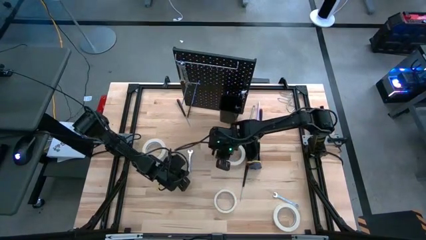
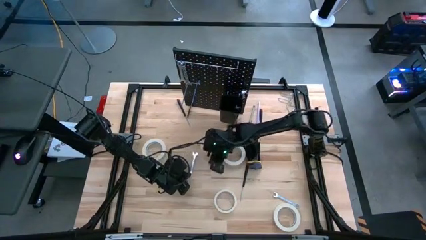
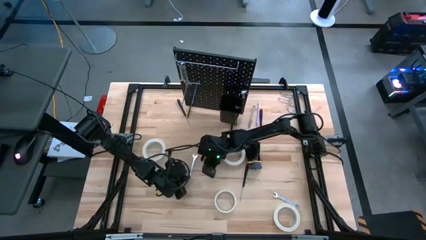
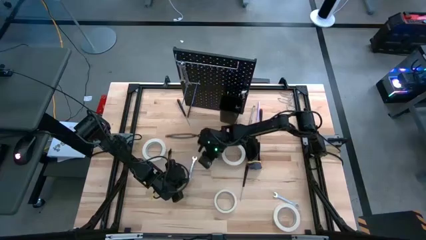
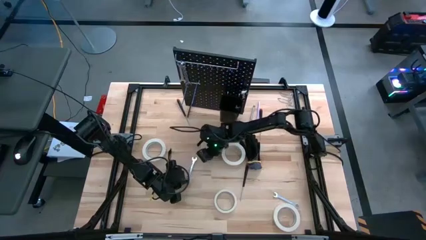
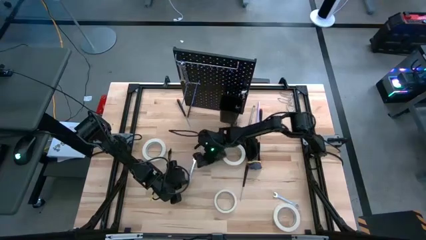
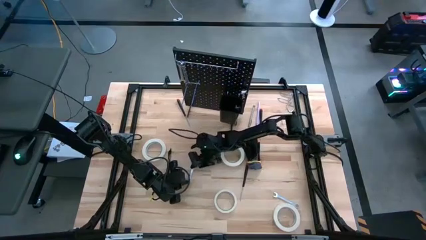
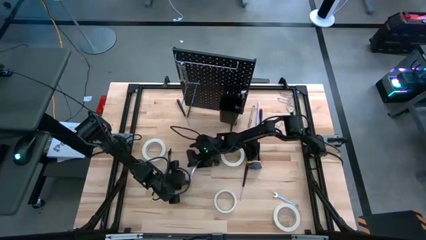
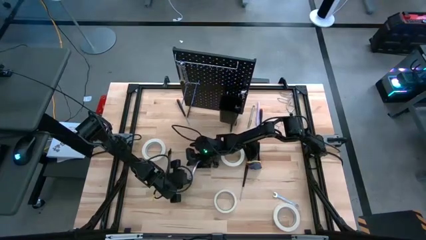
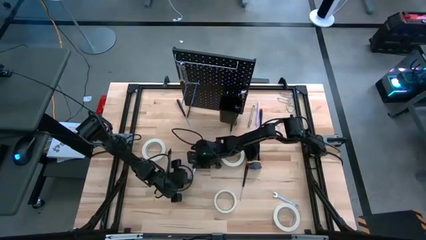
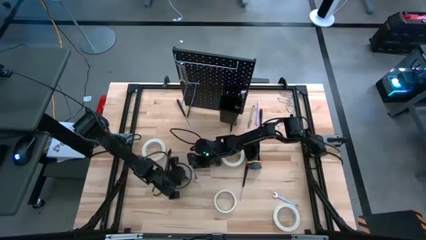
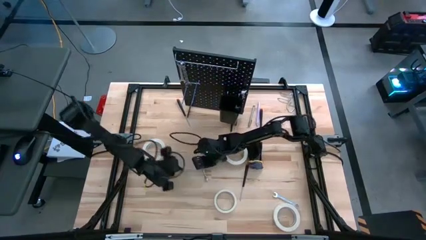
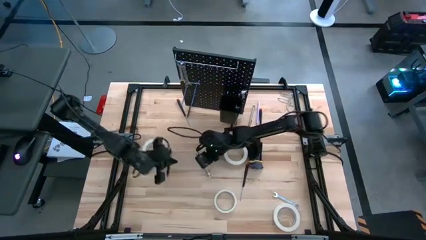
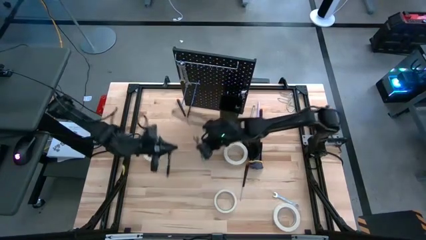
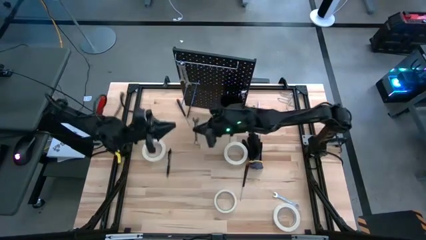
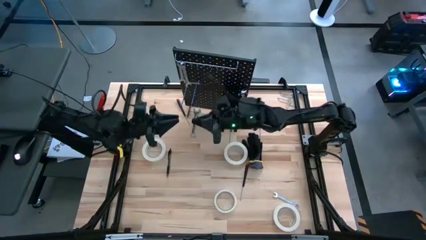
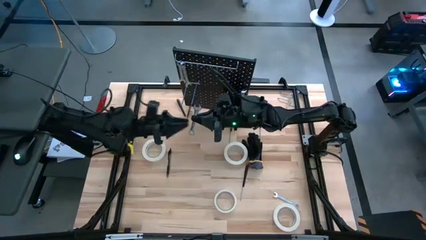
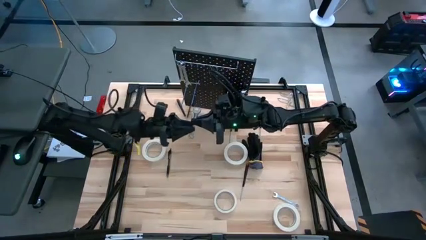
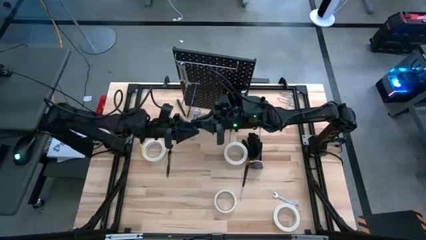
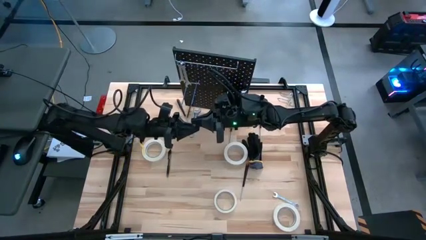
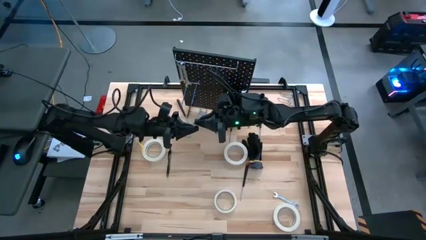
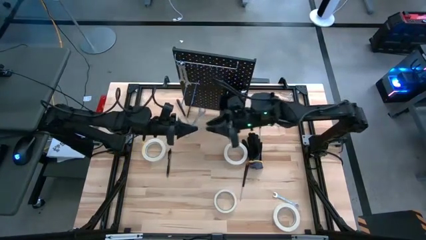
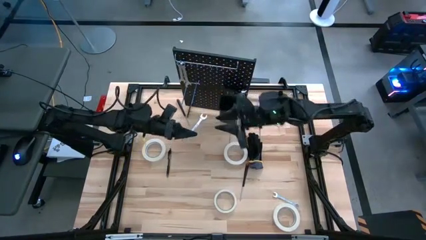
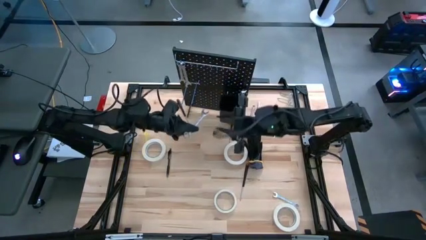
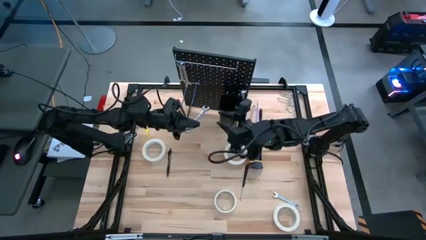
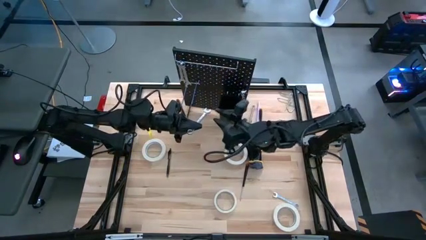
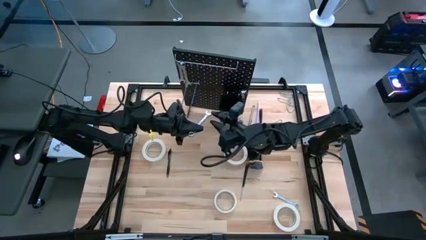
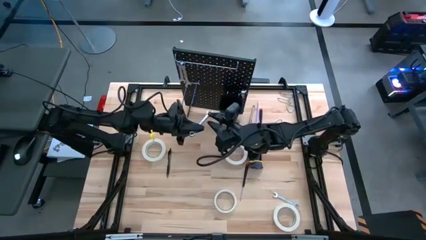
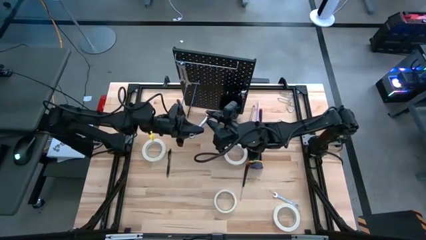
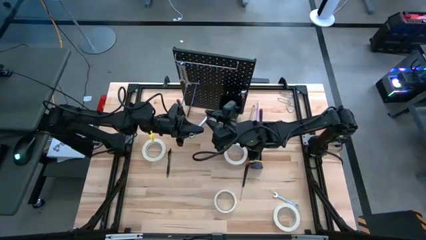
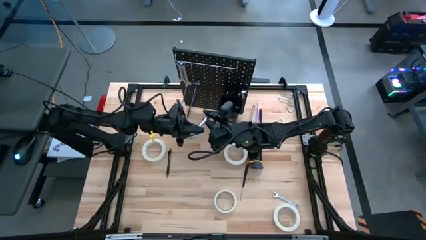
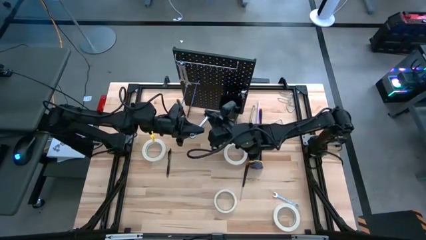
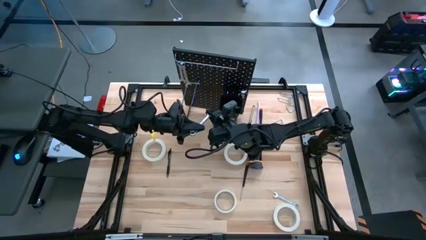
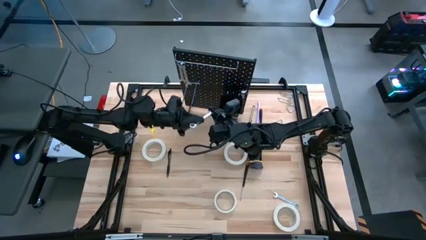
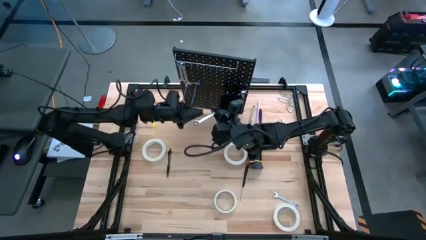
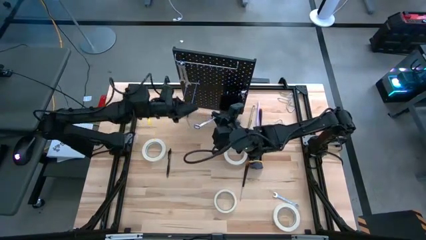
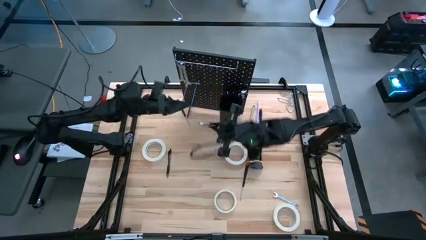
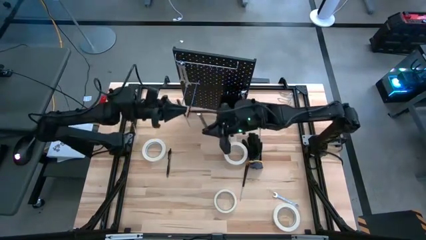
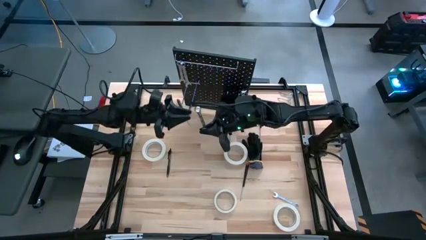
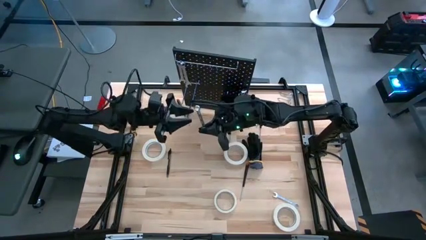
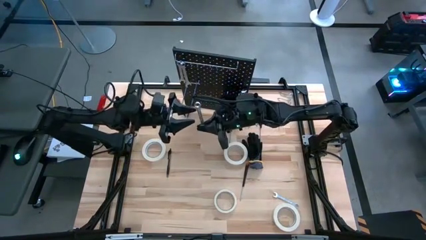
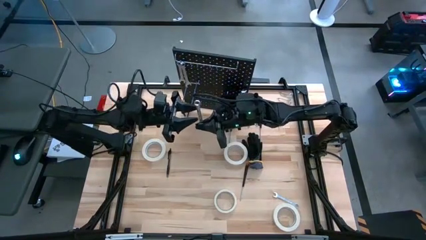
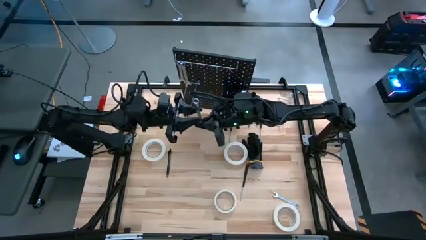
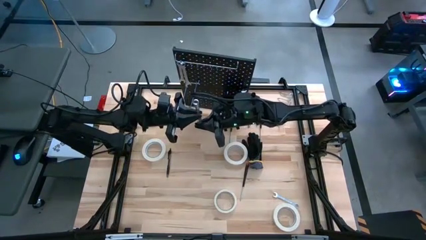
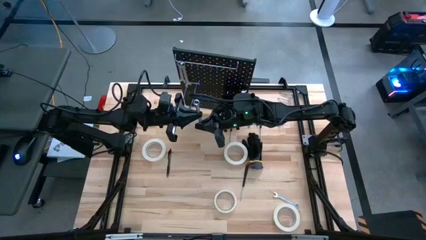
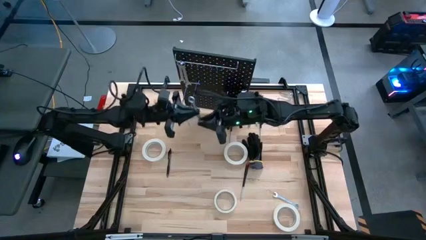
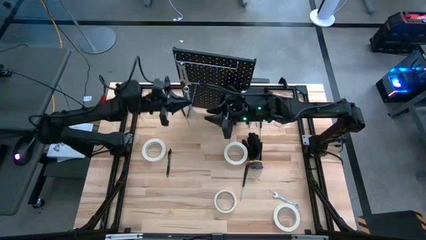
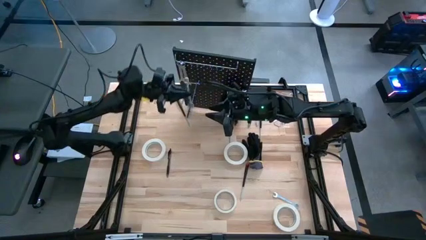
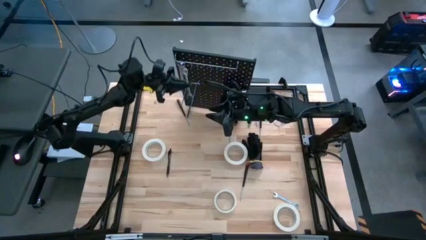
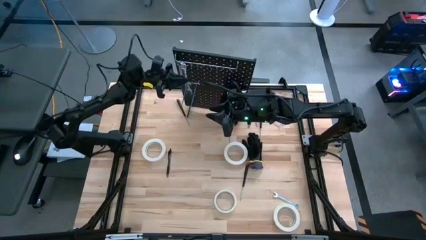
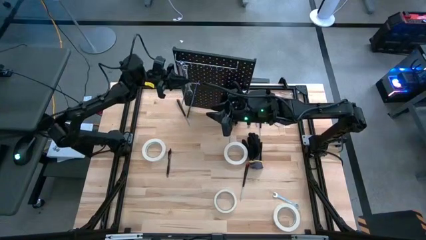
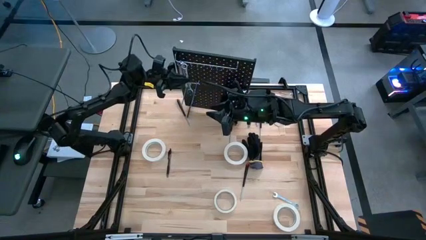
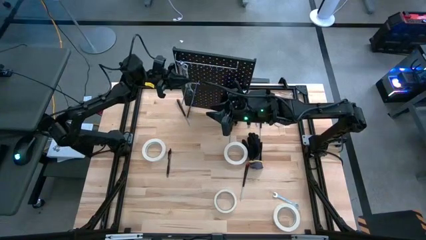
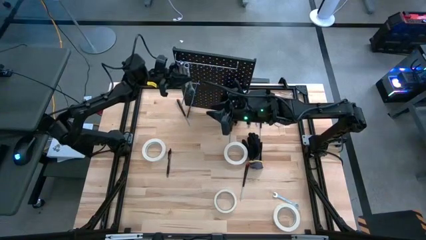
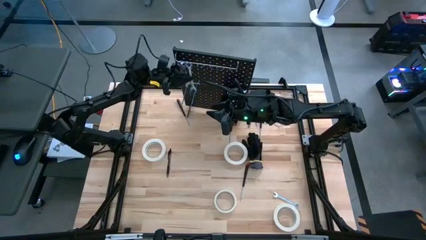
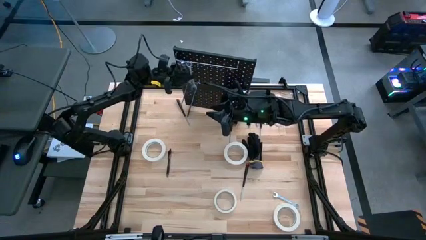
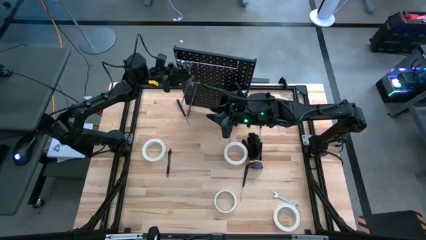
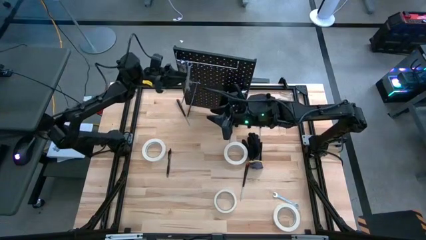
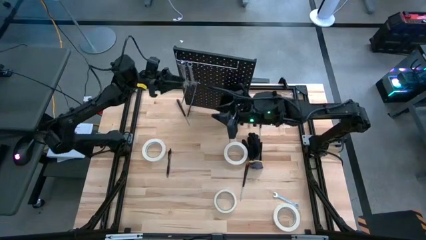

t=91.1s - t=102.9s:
Task: Hang tools onto peg board
Hang the 12 mm tool onto the pegboard aligned with the others
